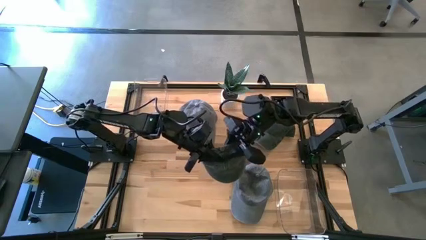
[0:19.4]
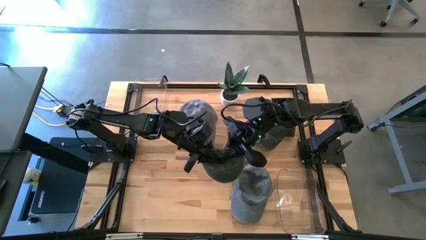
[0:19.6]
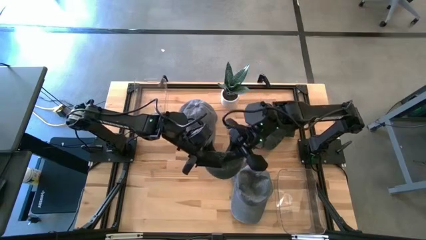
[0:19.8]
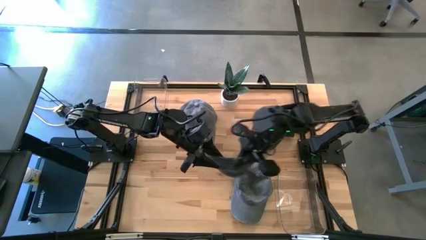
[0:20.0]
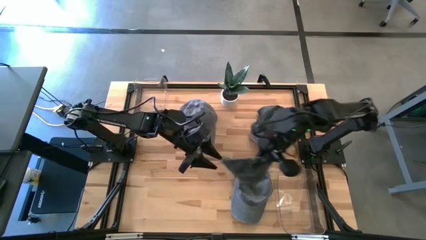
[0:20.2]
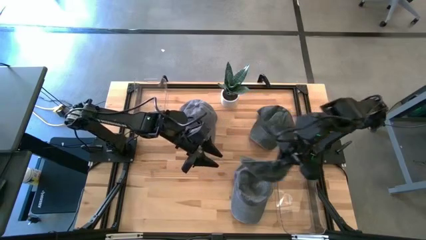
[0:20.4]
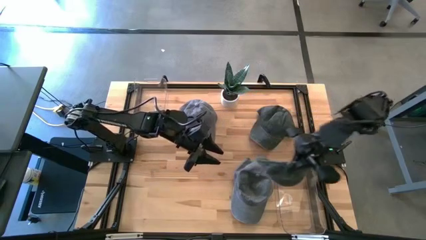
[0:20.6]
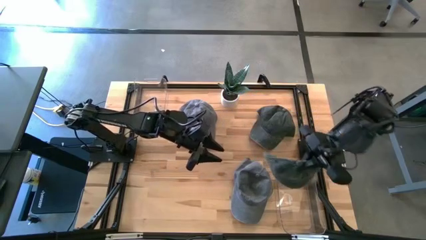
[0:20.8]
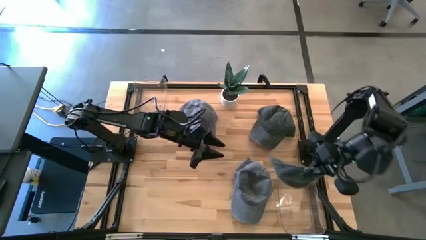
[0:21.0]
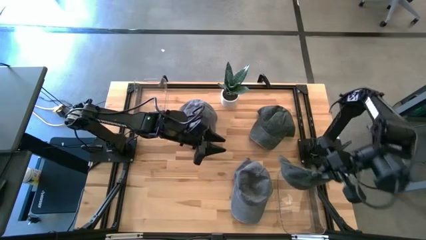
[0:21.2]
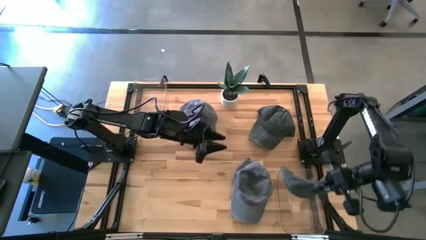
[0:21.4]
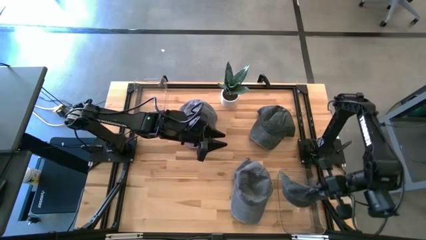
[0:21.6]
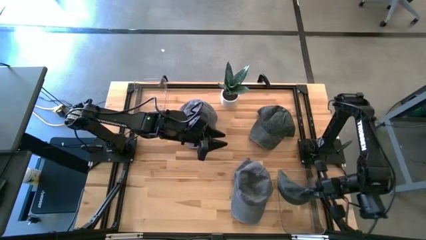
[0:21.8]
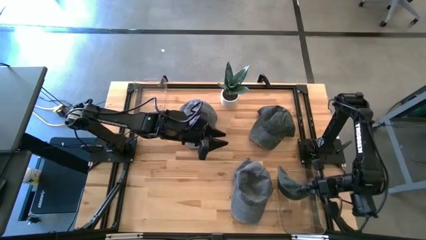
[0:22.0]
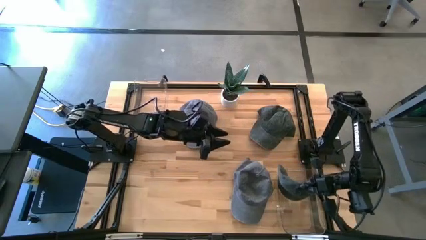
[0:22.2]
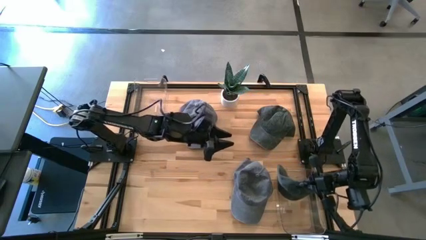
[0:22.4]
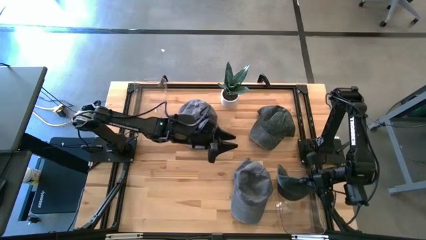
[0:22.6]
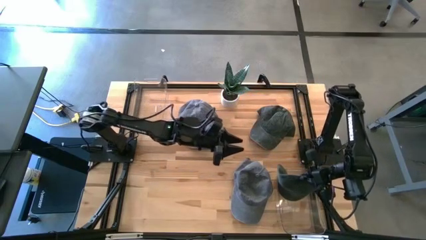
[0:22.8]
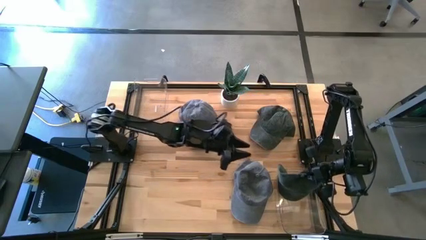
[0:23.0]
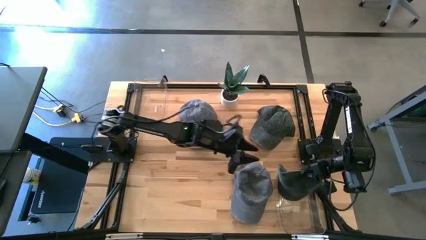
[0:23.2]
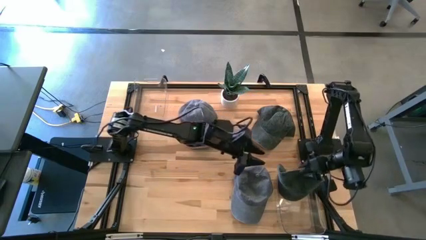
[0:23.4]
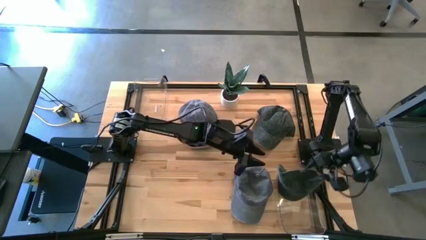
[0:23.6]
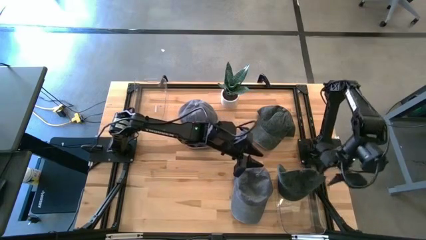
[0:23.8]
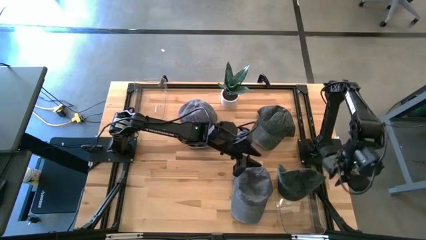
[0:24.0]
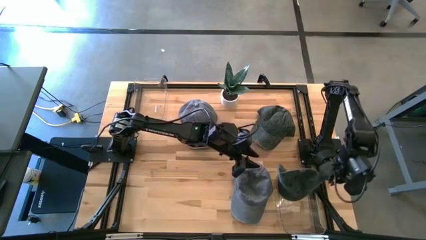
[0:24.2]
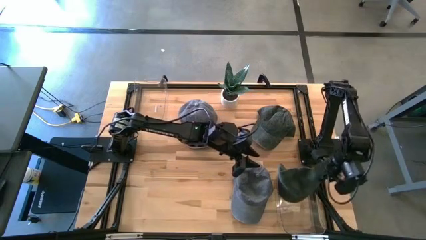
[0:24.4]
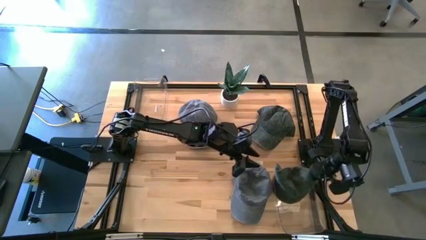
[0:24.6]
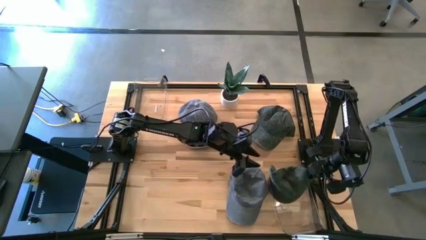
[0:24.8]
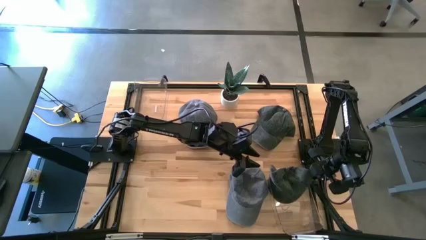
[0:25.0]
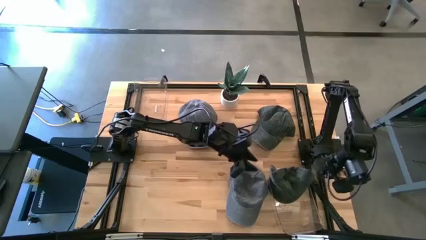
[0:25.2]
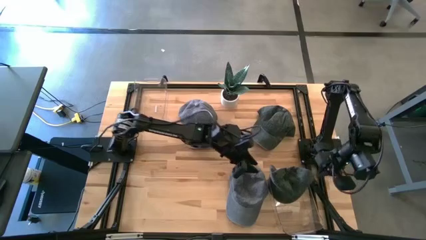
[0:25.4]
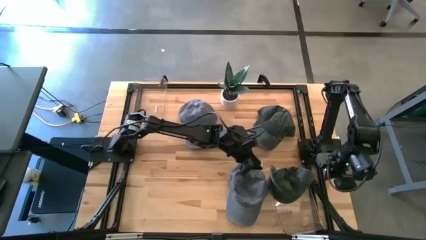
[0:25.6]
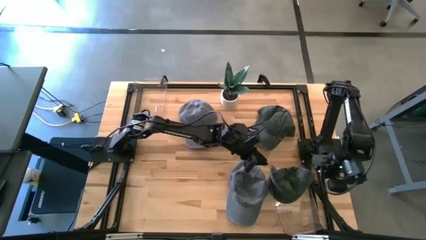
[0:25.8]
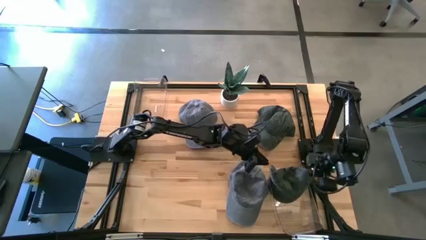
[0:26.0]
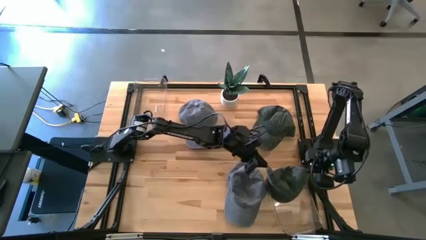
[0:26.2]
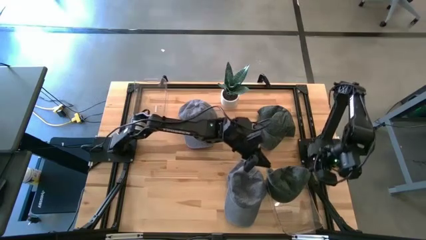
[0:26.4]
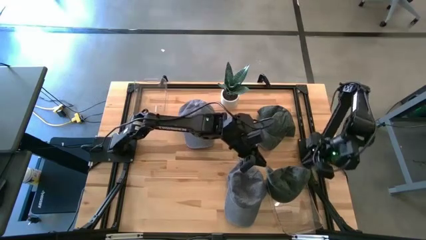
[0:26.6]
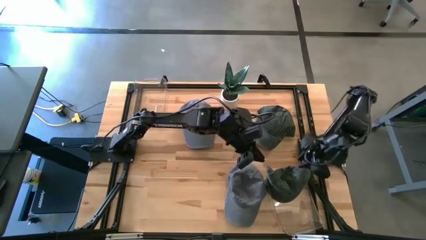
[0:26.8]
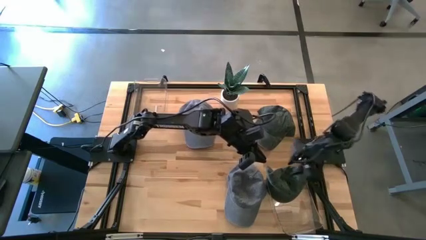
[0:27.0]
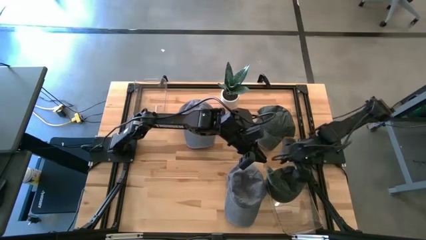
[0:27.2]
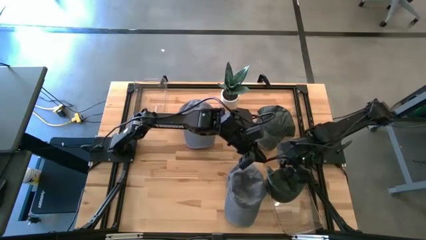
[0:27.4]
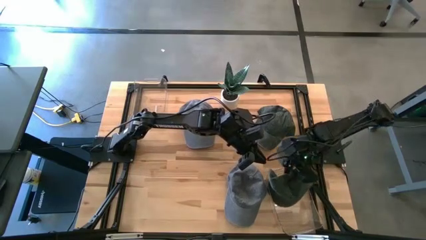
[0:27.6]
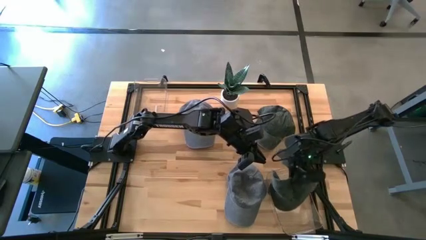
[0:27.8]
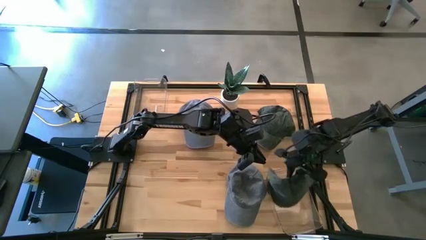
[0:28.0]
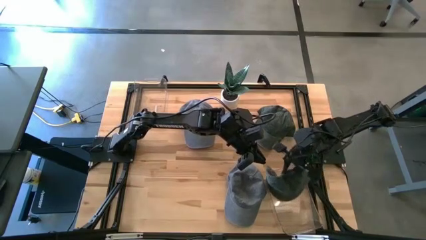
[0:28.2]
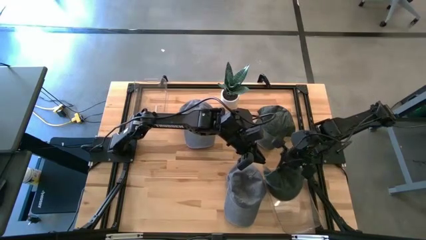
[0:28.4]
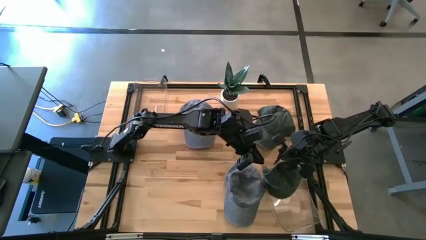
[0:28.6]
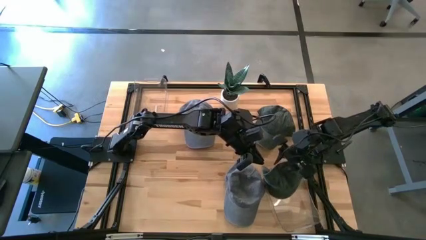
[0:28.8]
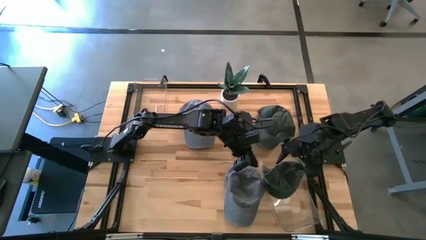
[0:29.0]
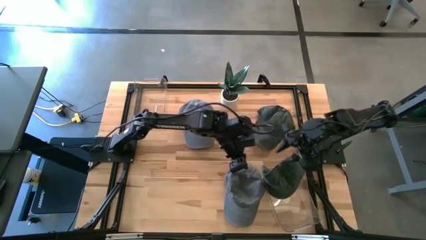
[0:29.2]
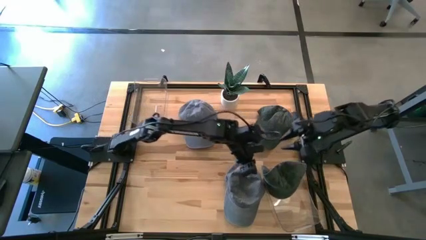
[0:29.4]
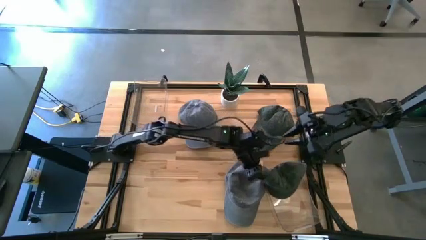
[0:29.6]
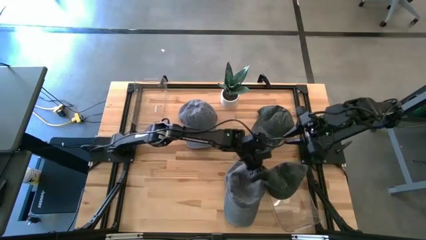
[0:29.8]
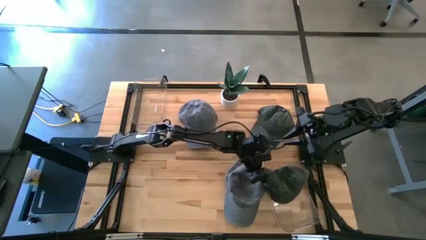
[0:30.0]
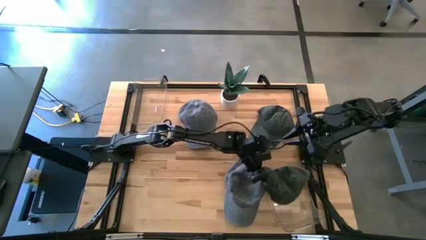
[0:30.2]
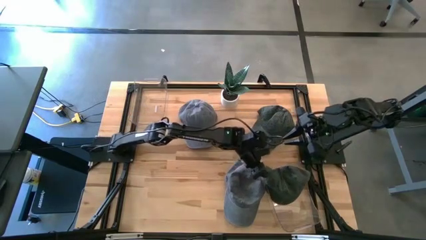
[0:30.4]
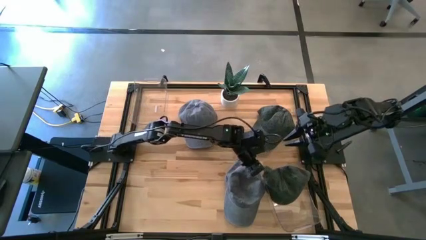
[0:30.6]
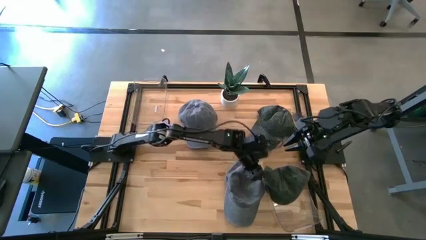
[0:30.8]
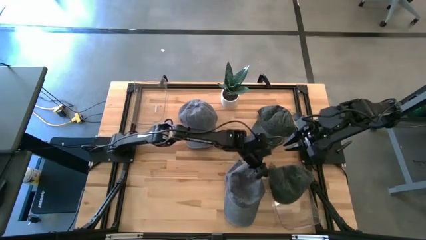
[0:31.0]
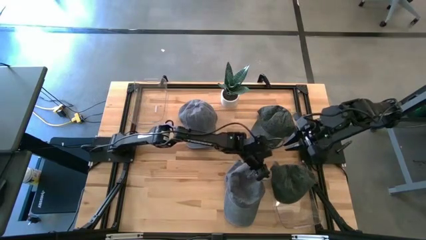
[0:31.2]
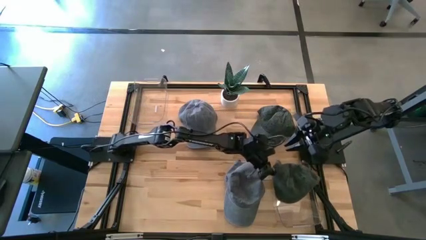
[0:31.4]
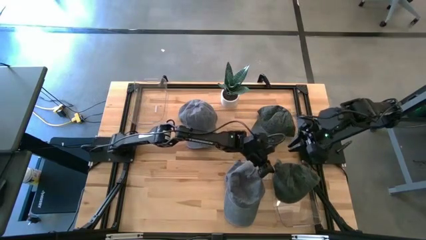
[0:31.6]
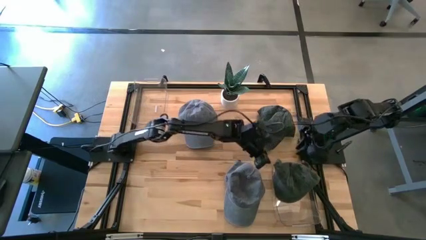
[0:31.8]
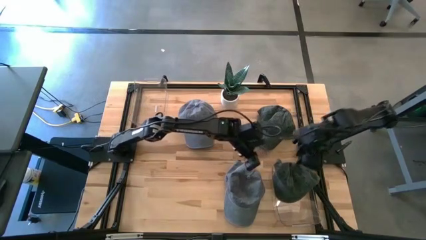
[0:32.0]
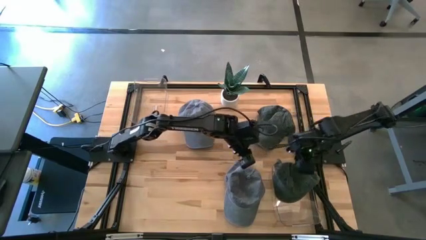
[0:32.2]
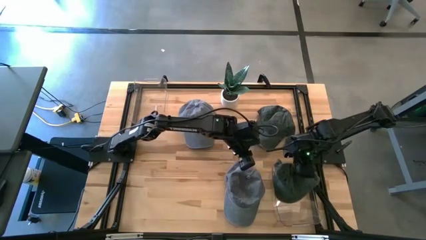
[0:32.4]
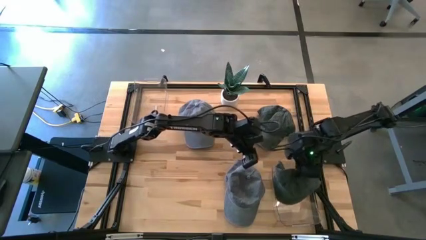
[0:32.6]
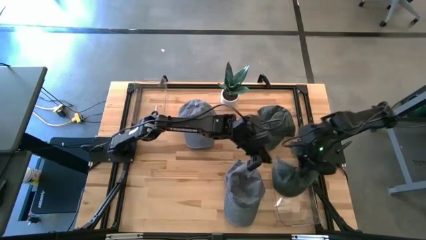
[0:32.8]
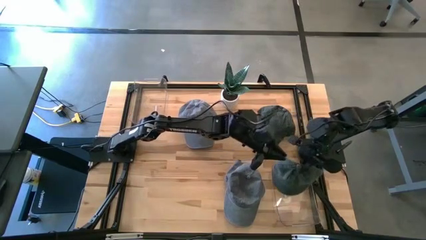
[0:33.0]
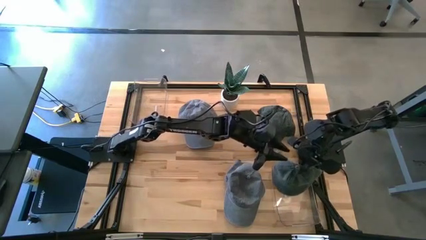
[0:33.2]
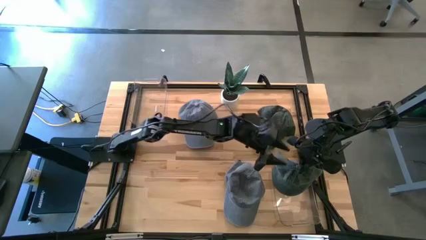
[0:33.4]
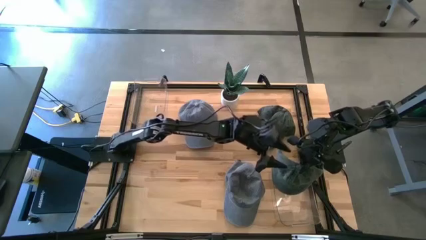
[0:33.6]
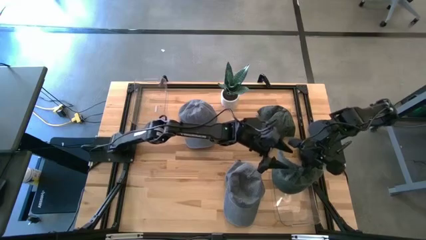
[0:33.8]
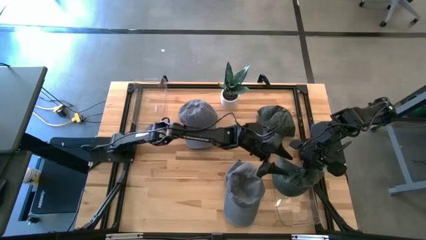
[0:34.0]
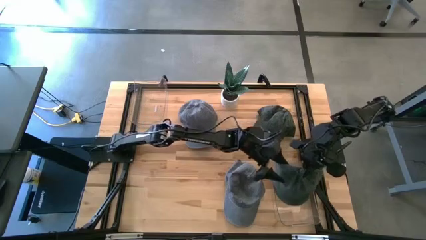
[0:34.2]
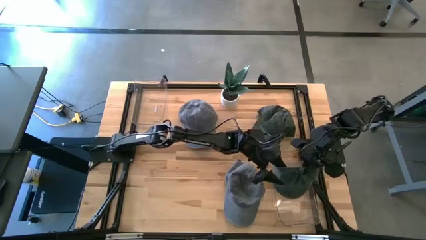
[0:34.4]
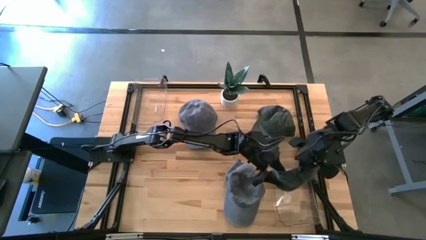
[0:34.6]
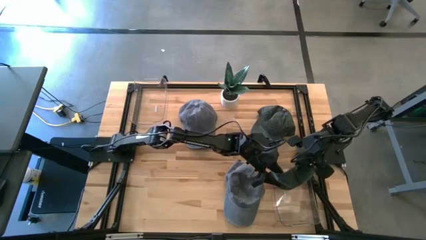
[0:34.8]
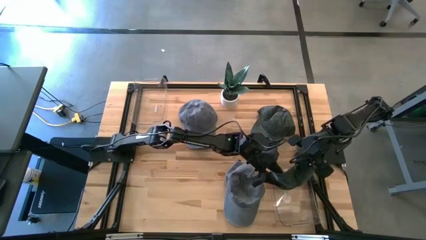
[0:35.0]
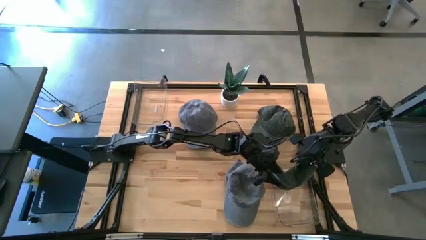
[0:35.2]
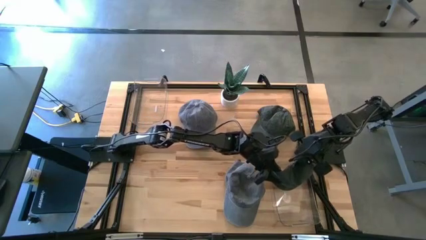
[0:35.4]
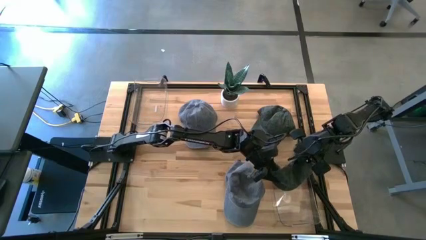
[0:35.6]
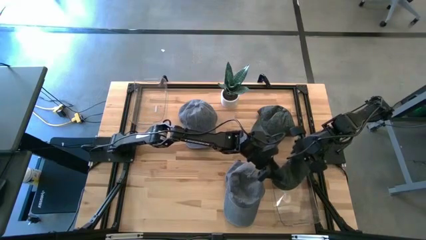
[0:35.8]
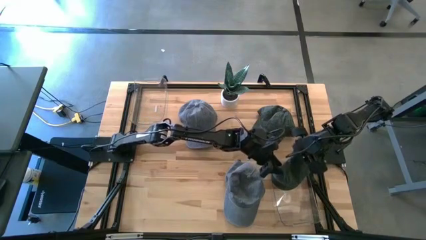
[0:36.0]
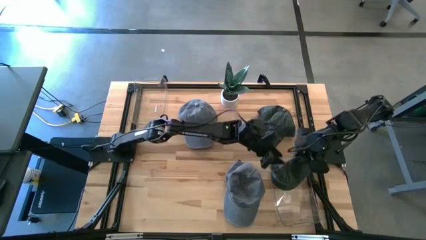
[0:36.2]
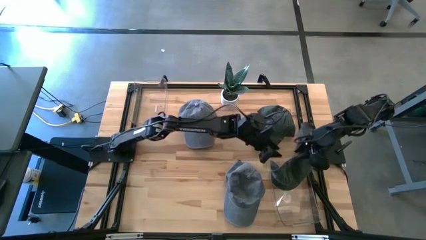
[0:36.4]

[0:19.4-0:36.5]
Task: Pick & Place hat
Put the bottom black cap into the bottom transparent bin
